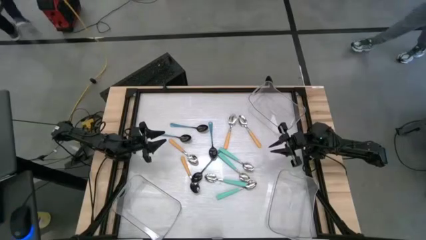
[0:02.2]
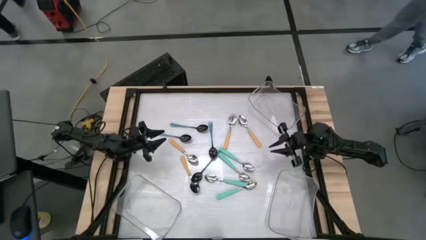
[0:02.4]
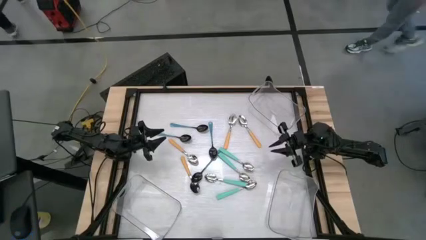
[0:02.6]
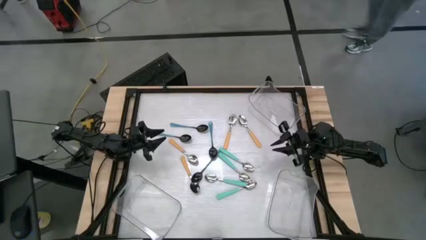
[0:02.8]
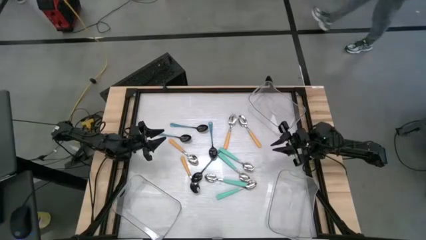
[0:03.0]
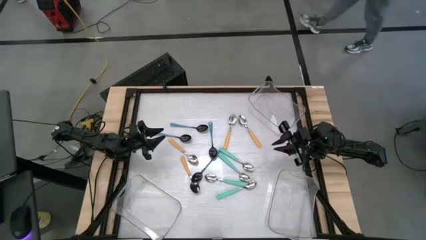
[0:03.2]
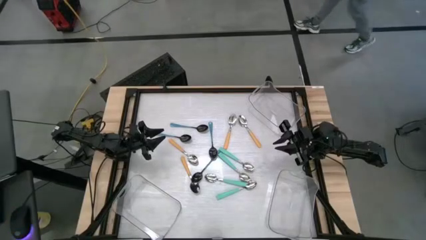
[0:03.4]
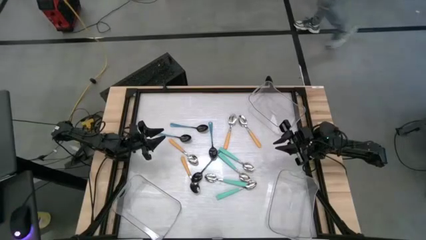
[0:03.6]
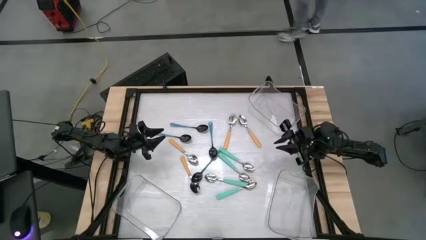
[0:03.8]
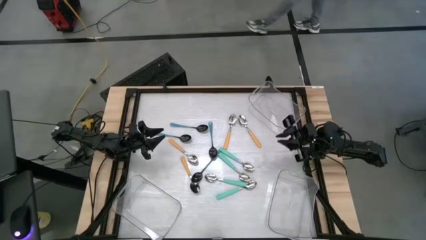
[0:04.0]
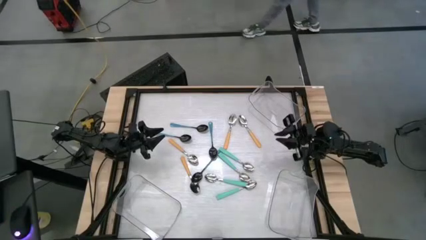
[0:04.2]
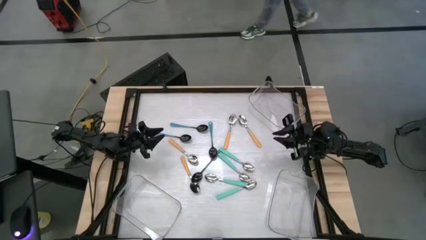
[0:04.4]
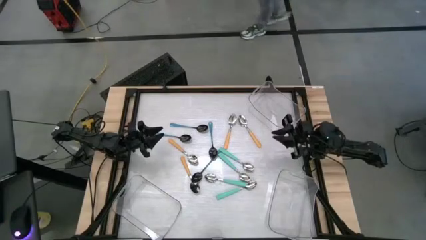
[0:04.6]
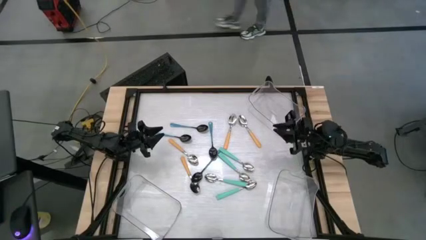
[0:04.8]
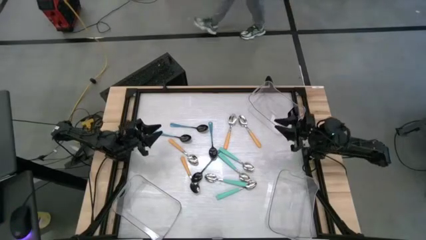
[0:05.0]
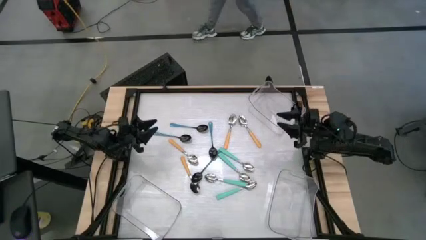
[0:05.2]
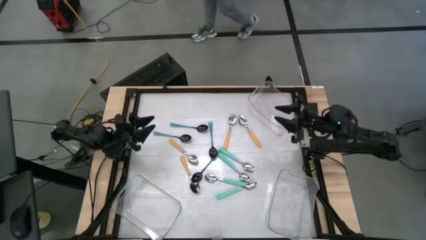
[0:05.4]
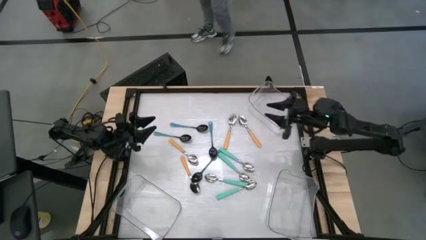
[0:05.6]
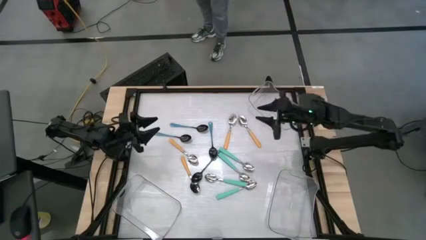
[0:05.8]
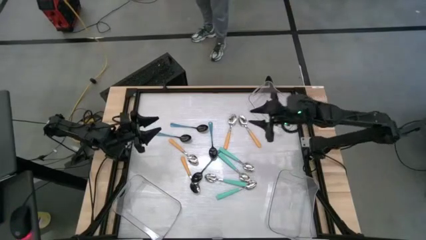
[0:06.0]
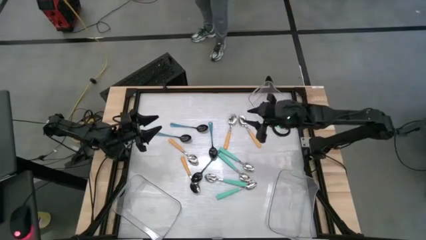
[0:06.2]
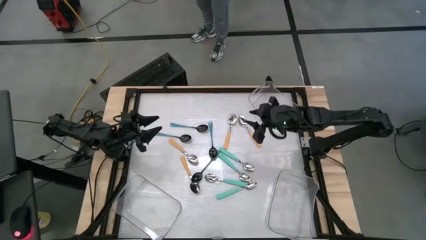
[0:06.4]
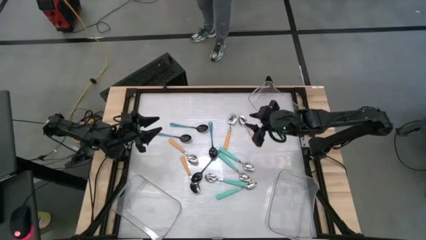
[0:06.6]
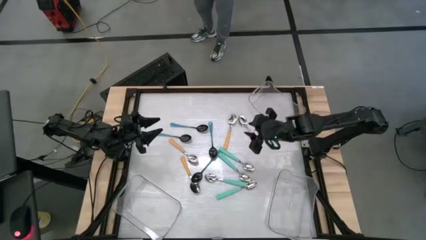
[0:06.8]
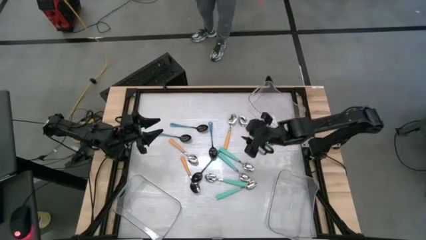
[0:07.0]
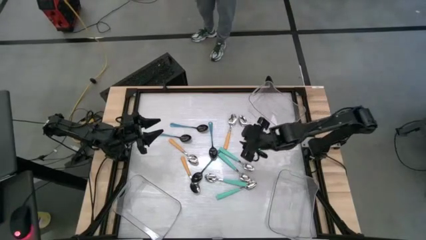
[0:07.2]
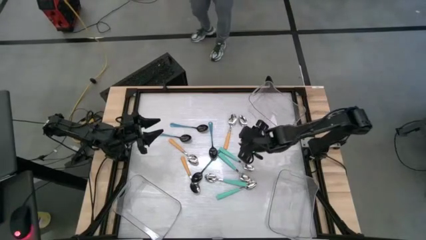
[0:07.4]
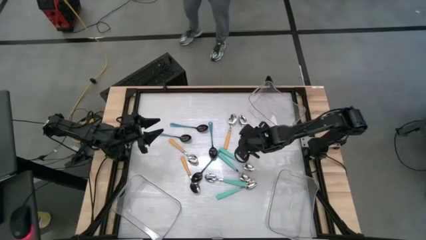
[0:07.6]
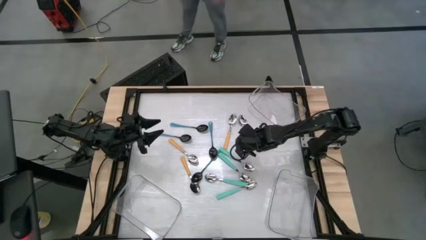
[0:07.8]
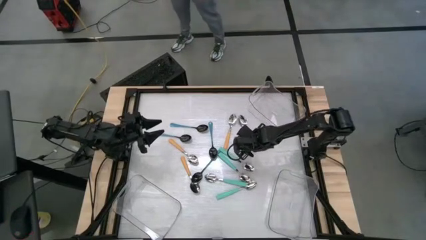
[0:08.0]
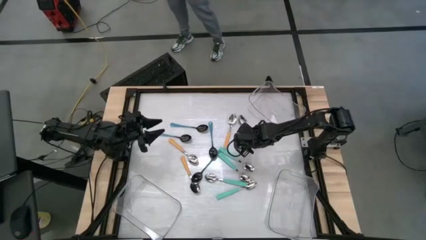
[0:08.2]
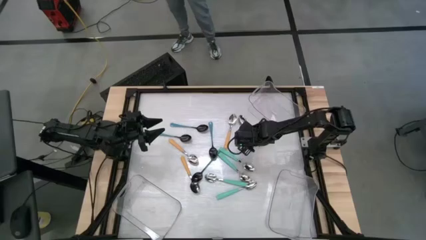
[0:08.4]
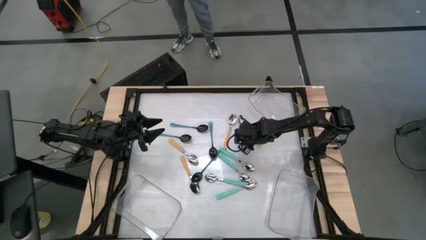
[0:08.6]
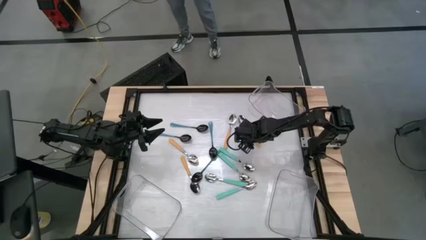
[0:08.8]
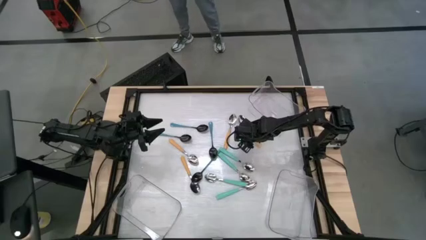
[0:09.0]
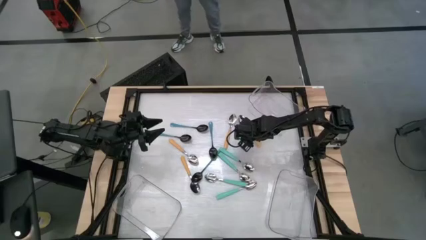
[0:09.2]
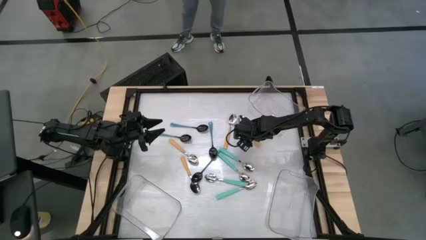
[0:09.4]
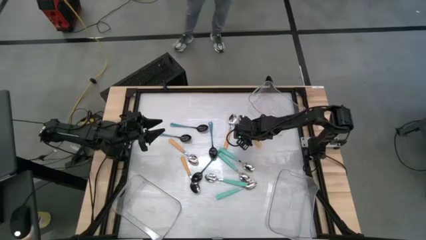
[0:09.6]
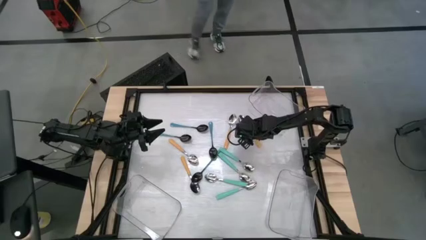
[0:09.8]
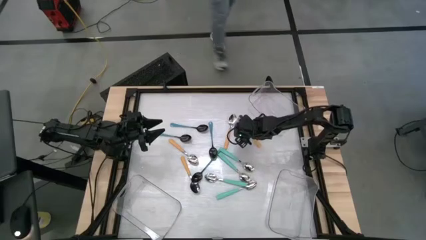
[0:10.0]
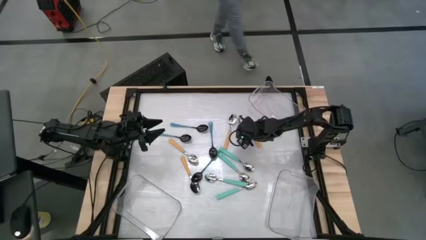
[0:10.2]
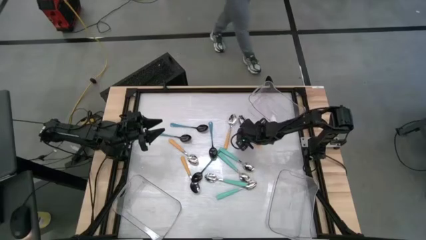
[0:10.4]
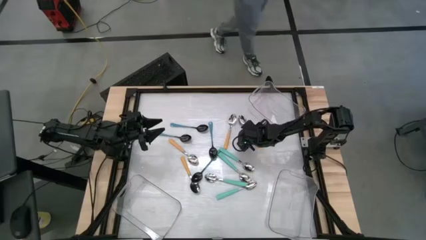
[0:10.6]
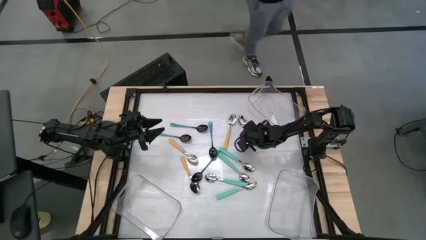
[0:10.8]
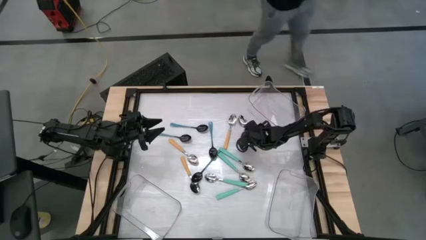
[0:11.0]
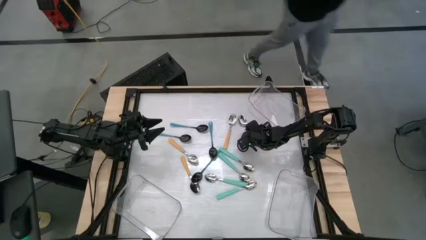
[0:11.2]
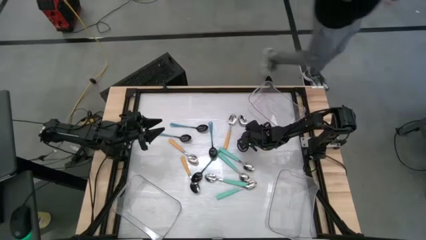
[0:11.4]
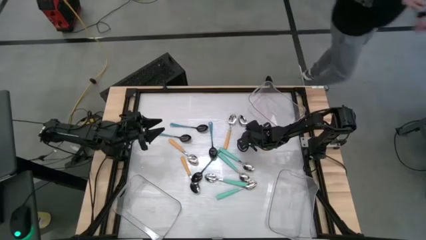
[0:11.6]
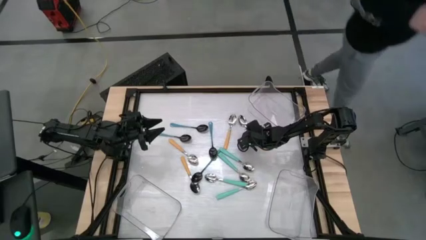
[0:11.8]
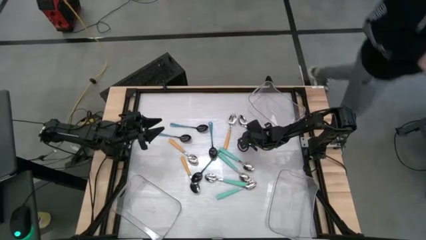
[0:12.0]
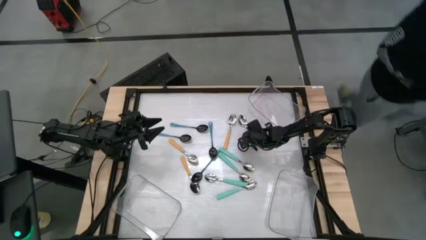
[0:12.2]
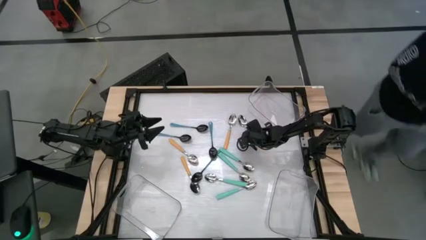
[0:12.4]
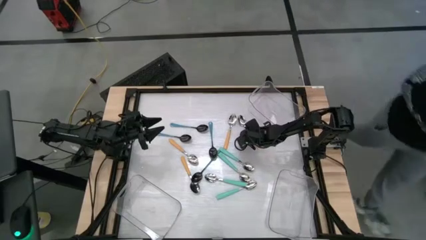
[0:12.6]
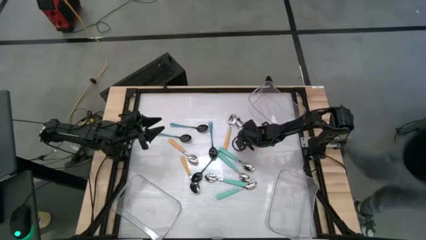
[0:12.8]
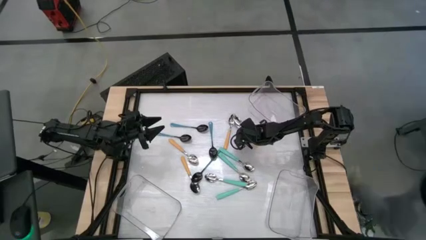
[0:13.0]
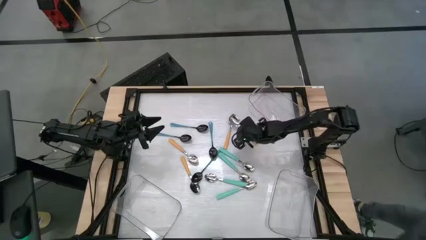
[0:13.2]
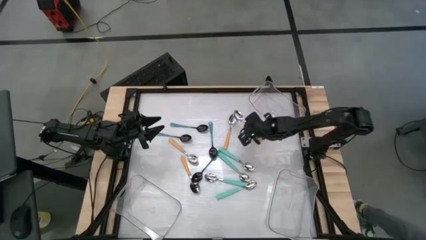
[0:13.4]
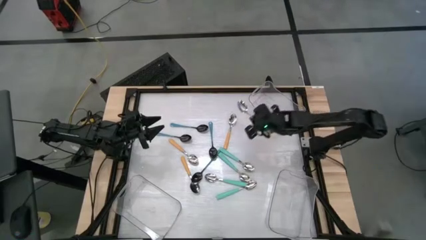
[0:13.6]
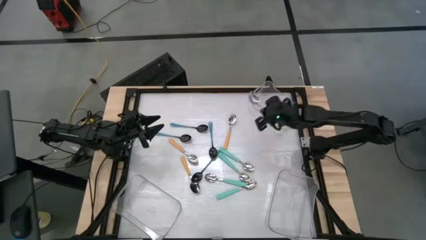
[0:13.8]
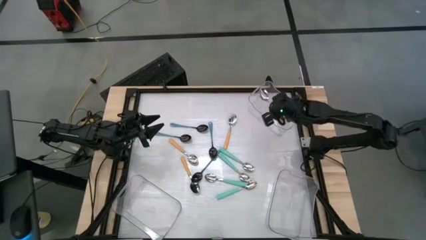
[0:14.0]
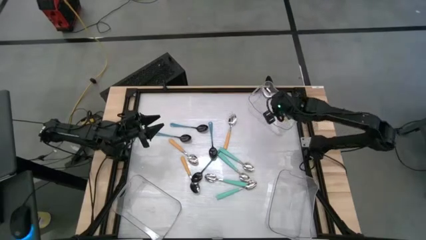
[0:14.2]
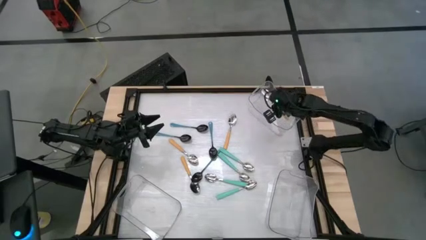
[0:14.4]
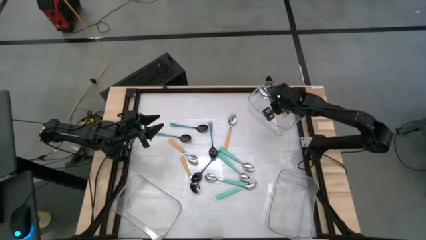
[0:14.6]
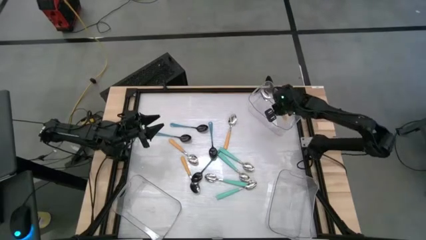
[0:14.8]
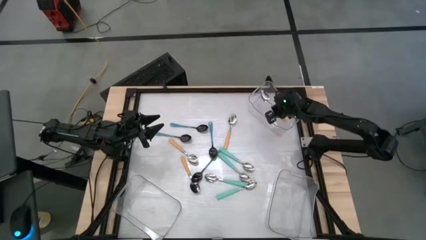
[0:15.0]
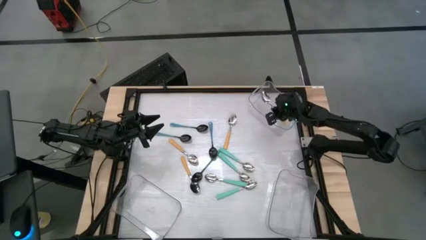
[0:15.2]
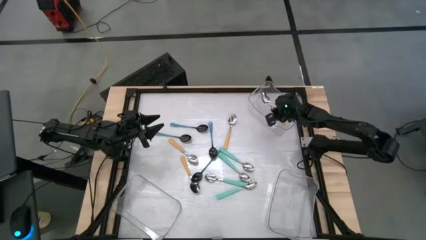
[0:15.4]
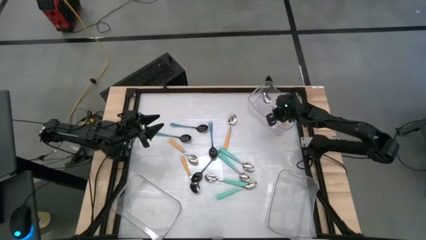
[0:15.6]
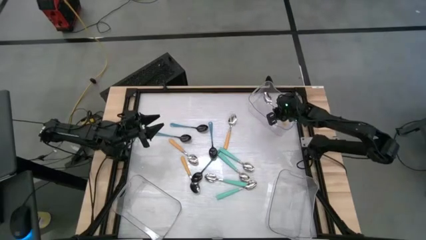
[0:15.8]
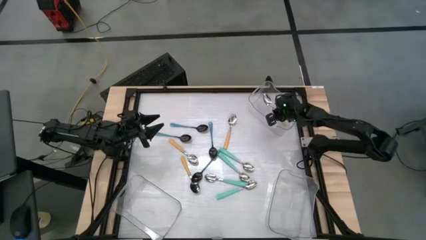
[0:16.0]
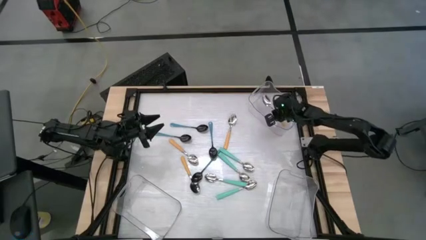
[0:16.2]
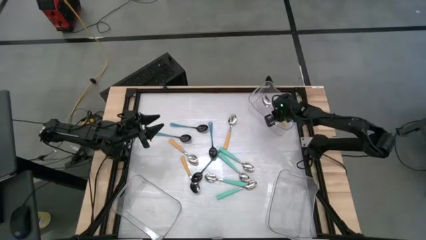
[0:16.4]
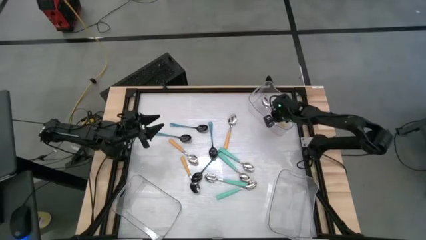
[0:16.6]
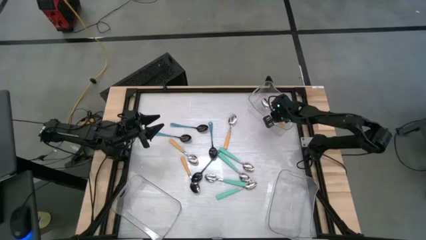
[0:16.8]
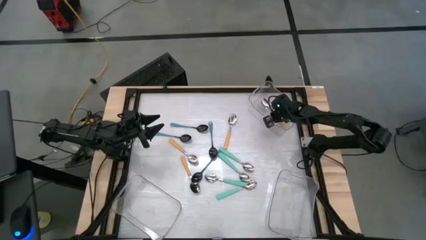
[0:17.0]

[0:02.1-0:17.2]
Task: Sort silverware by color (type)
Put the yellow spoon into the top transparent bin
